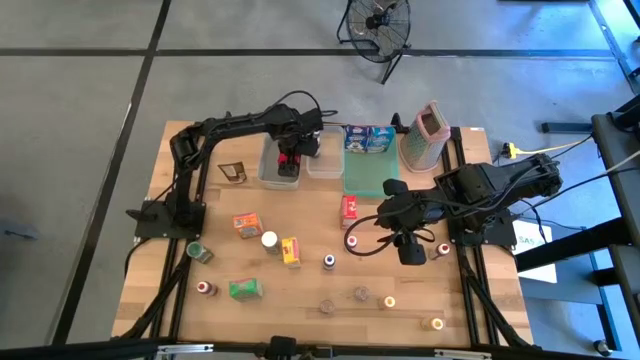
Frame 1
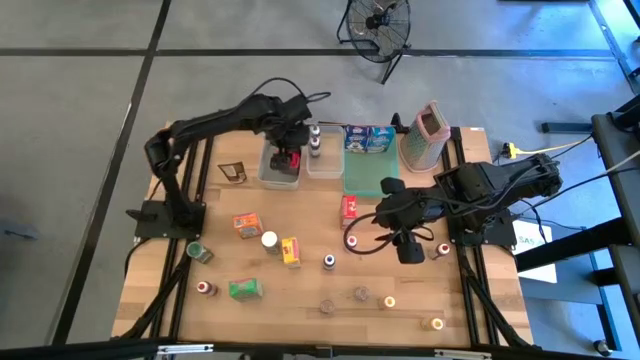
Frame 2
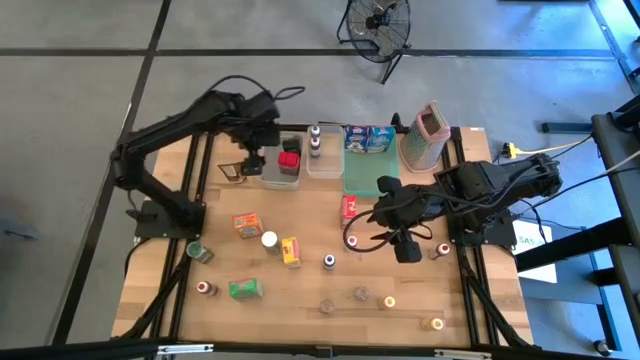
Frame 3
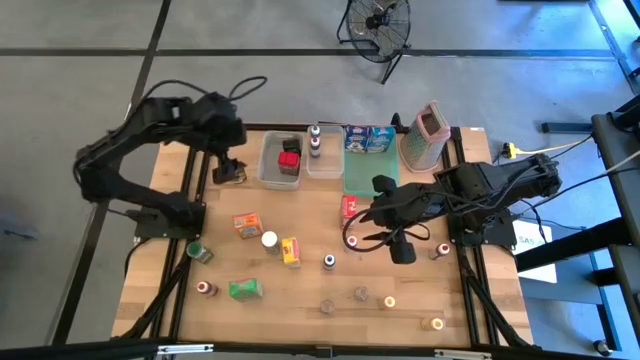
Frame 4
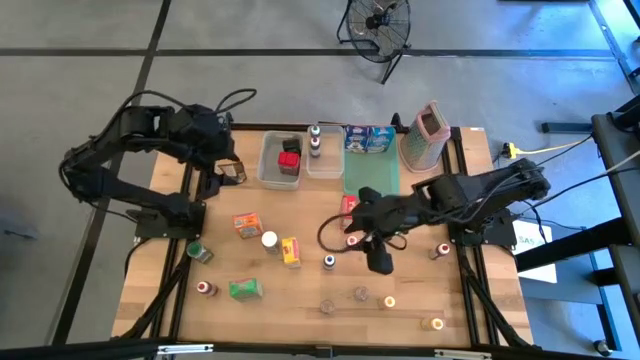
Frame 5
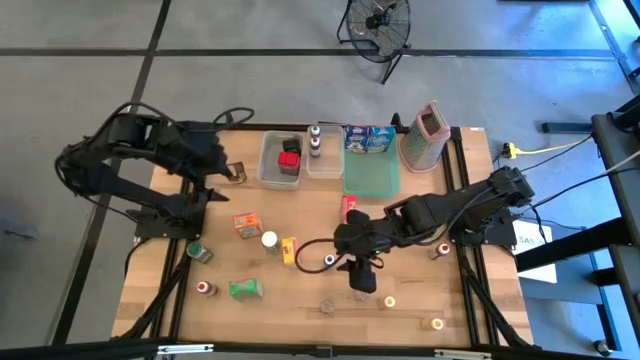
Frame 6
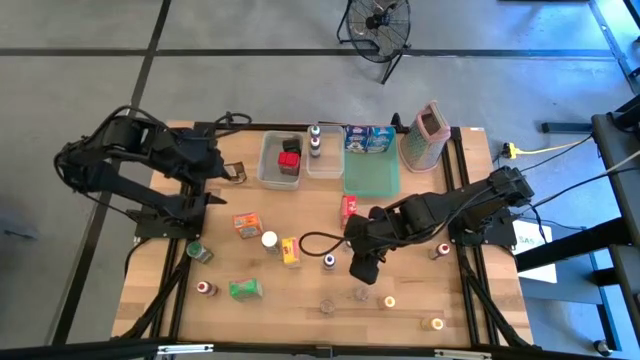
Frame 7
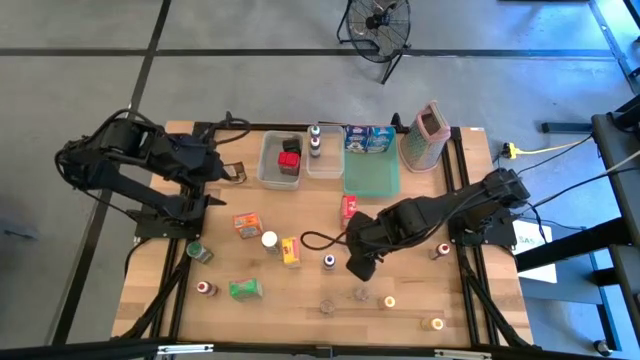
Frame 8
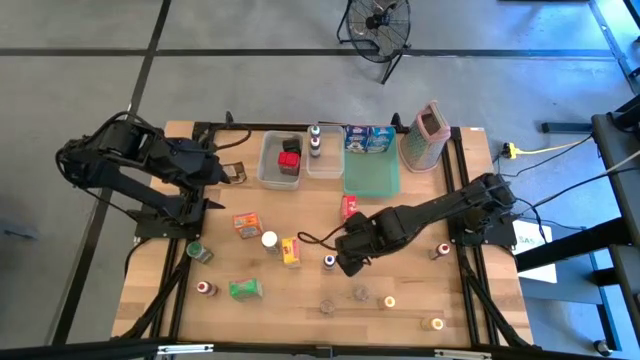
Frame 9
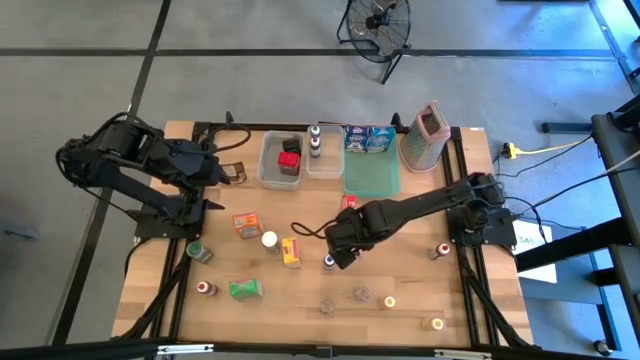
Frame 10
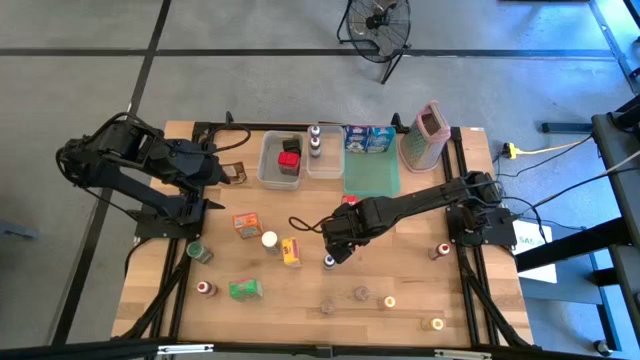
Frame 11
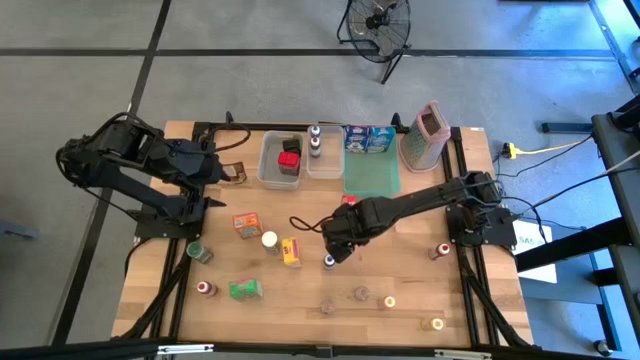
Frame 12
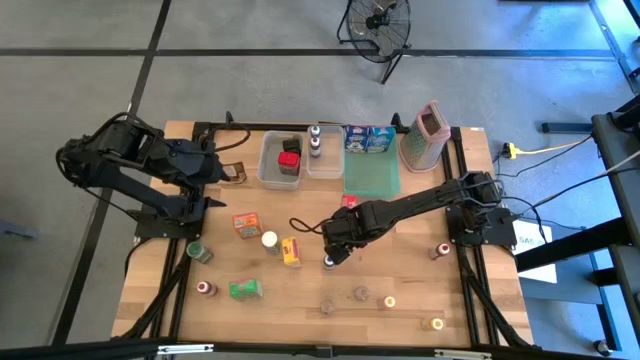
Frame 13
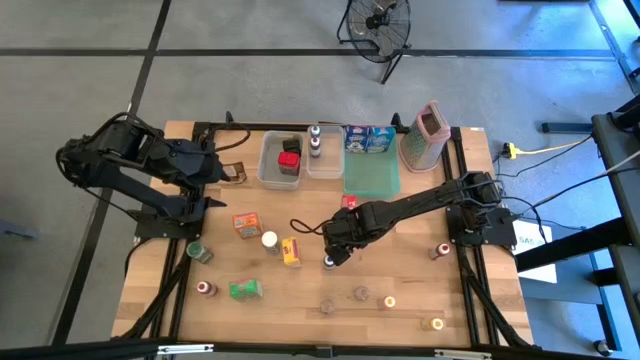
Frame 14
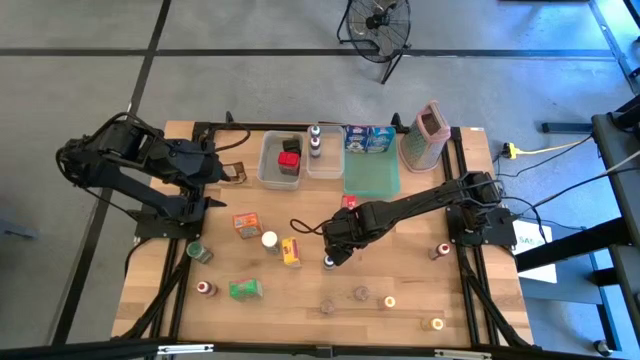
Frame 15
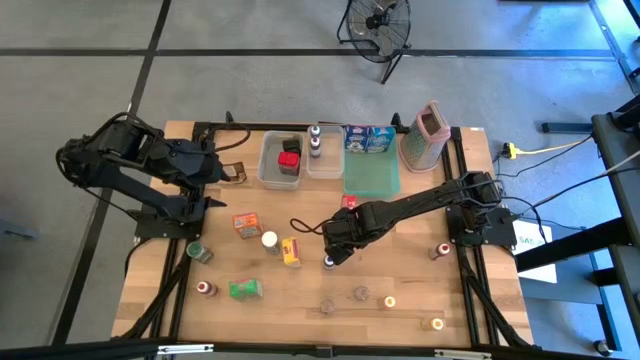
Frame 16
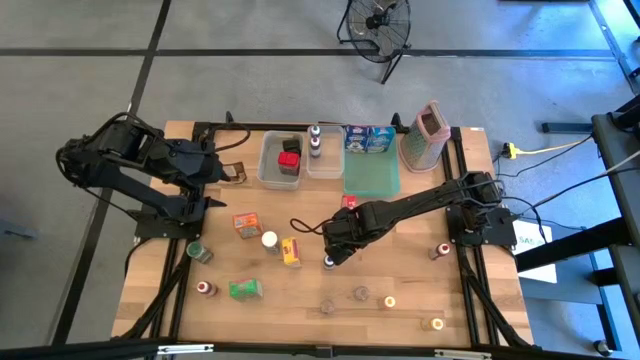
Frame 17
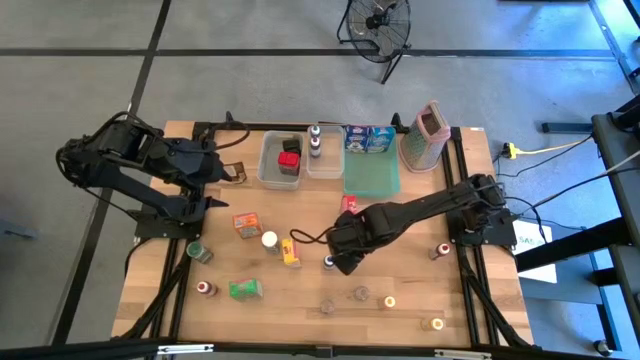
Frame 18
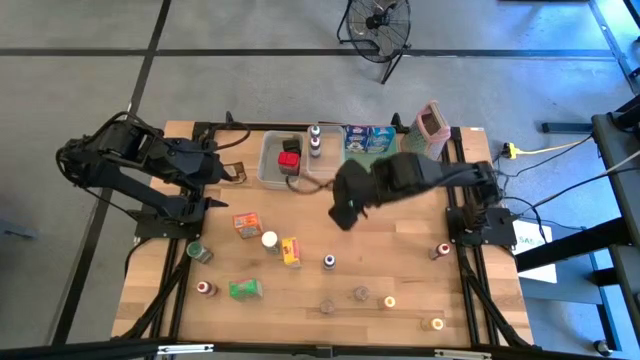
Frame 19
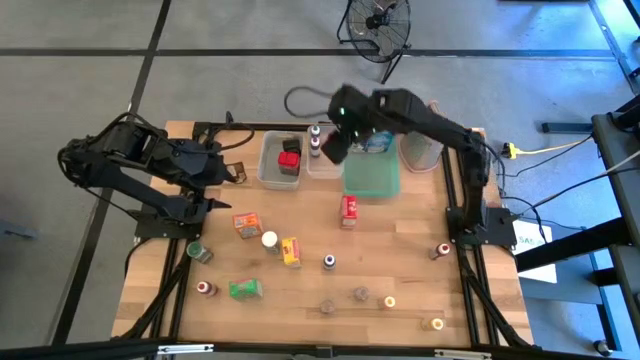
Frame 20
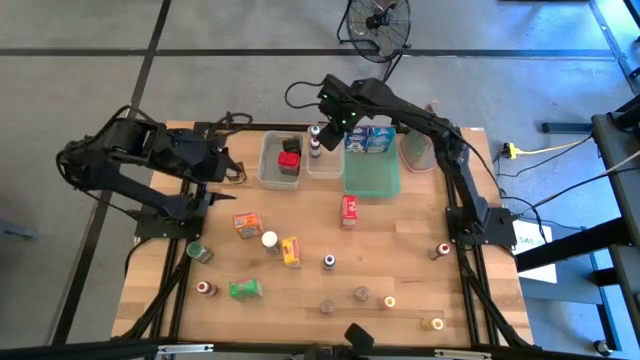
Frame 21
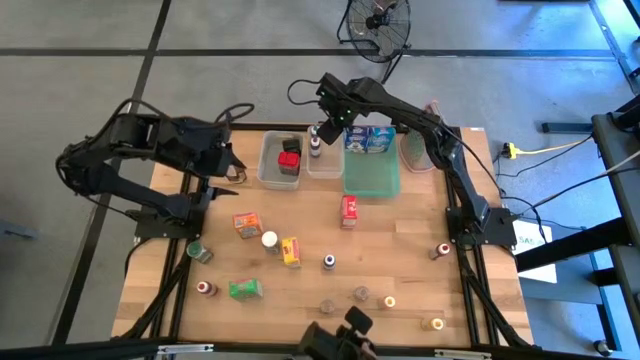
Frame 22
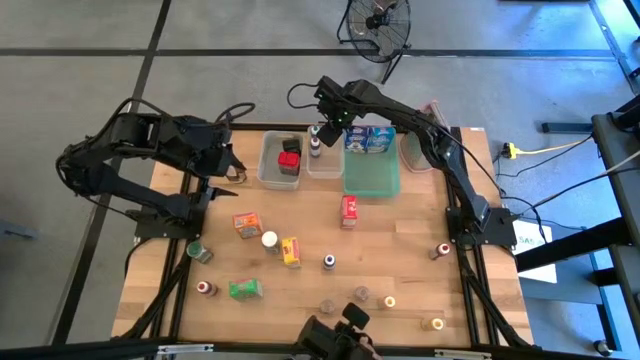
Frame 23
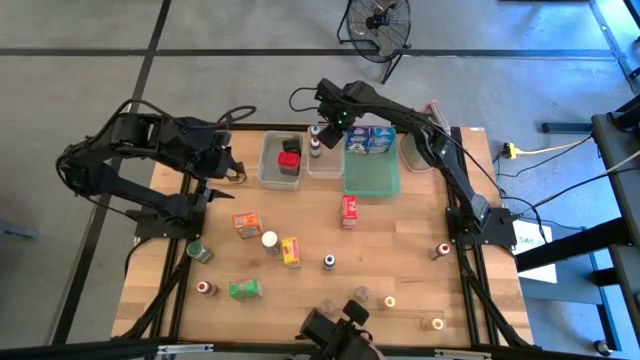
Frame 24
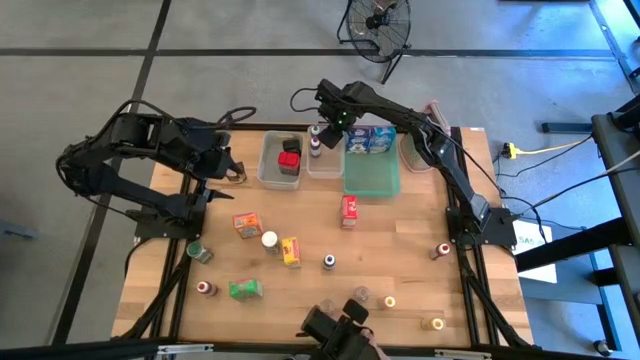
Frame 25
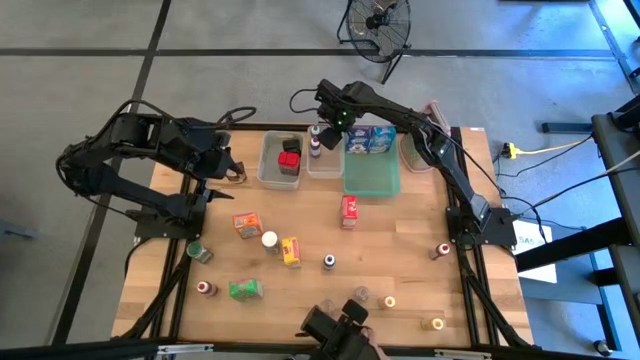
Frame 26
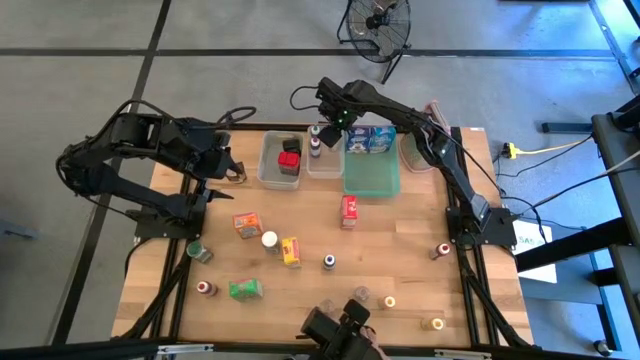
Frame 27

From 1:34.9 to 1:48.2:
Task: Pick & Place Kitchen Items
Put the pink food coloring bottle into the transparent bin

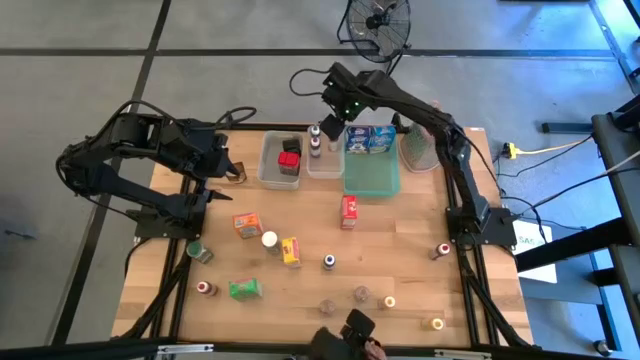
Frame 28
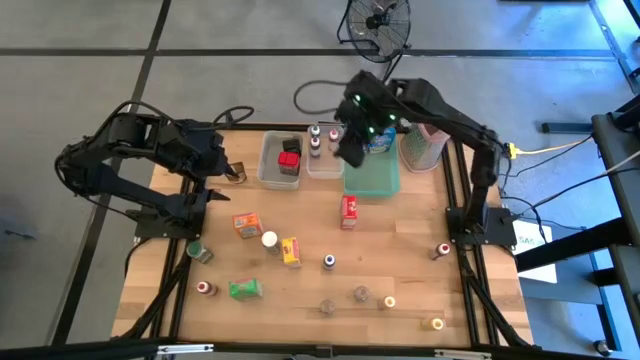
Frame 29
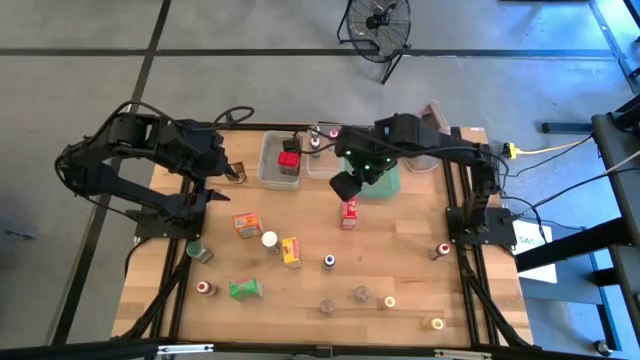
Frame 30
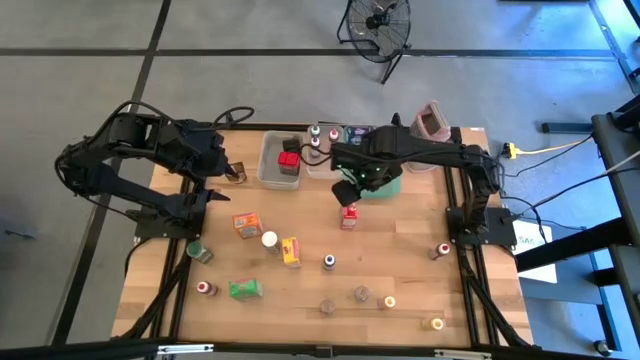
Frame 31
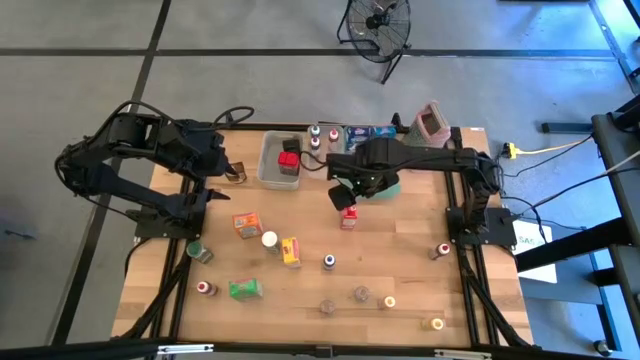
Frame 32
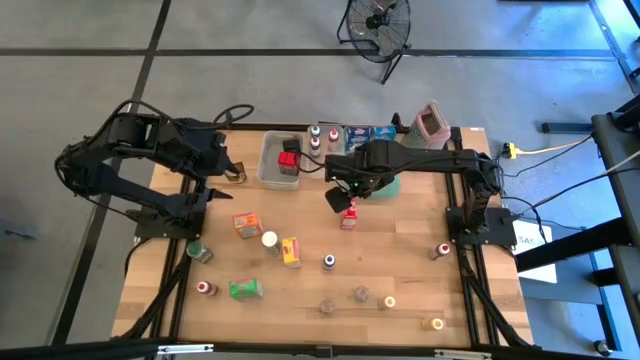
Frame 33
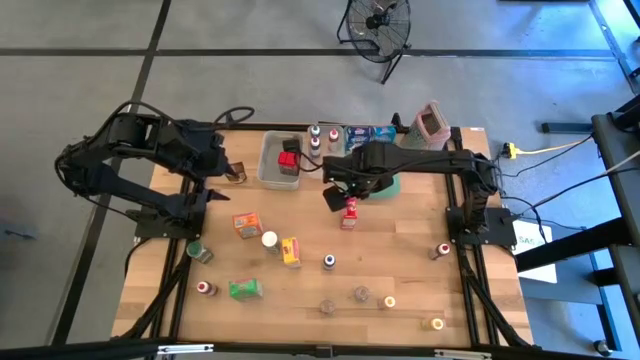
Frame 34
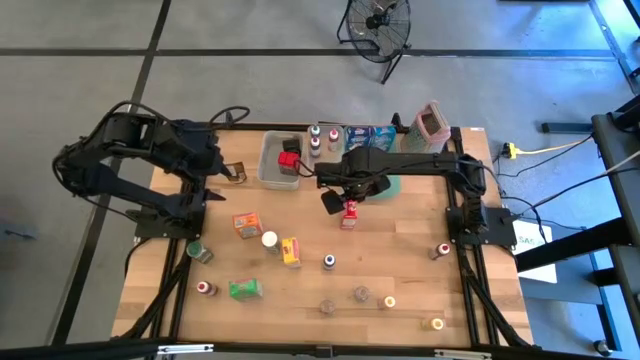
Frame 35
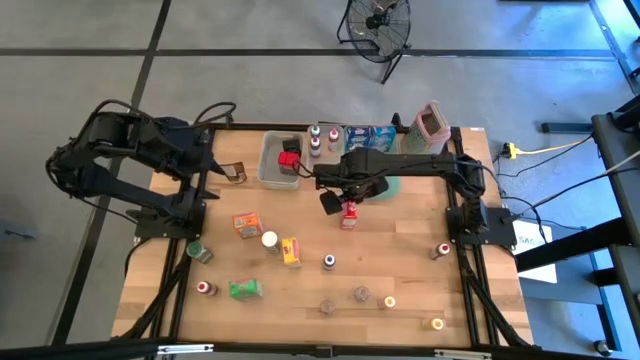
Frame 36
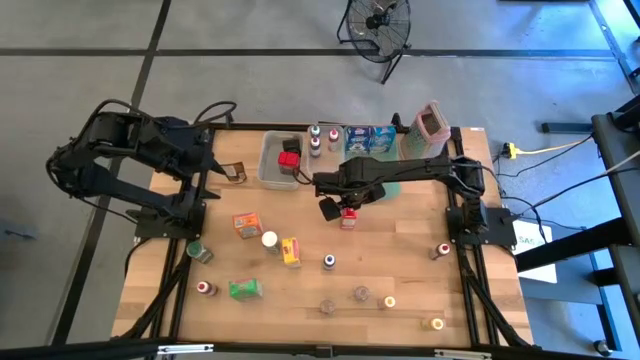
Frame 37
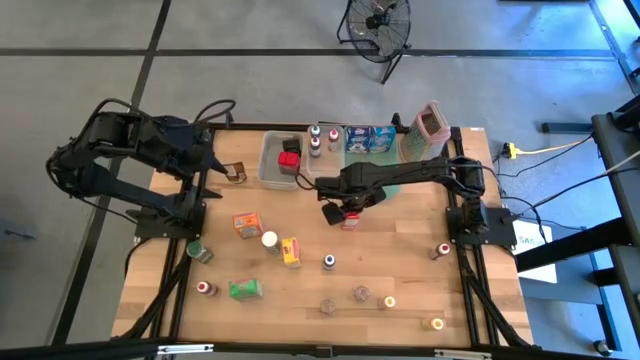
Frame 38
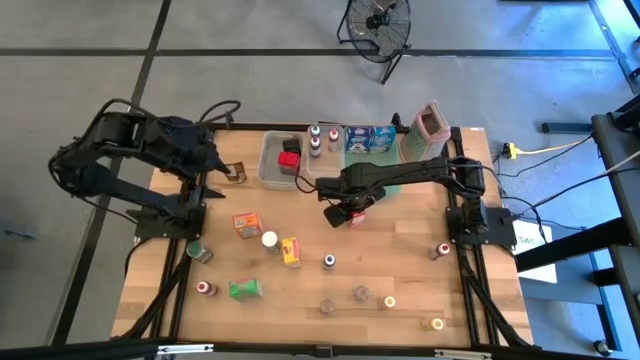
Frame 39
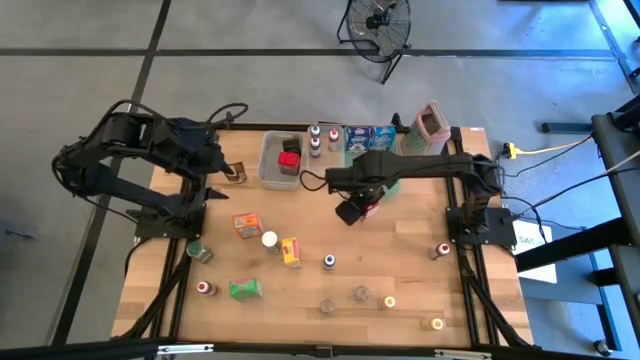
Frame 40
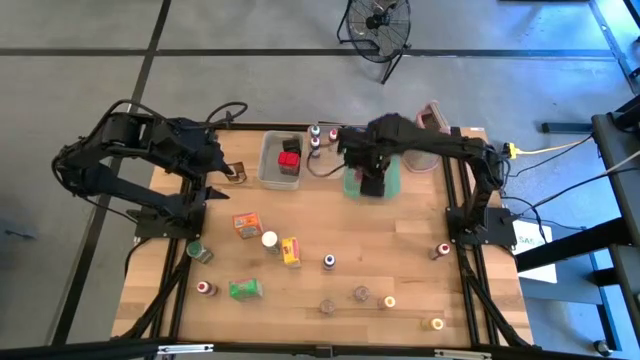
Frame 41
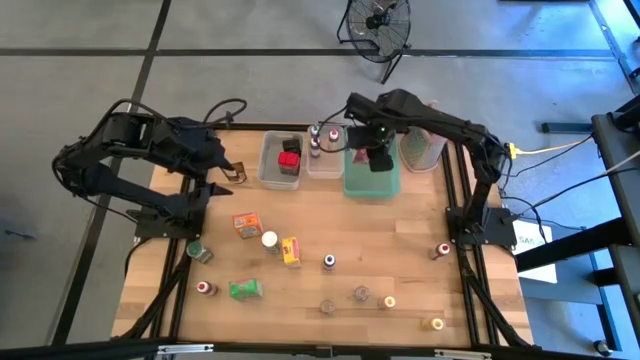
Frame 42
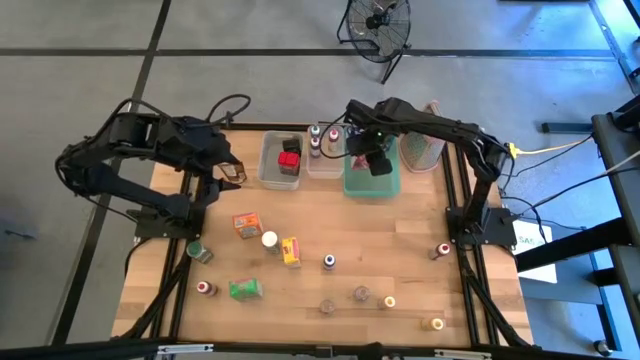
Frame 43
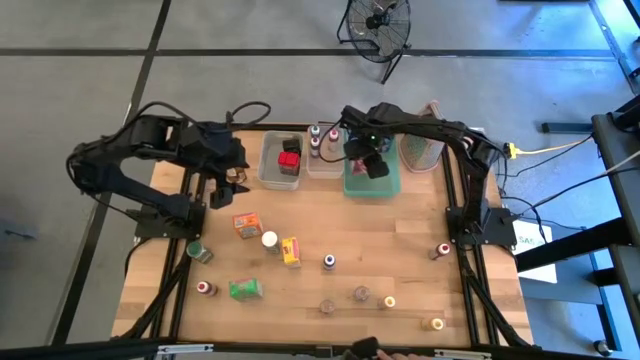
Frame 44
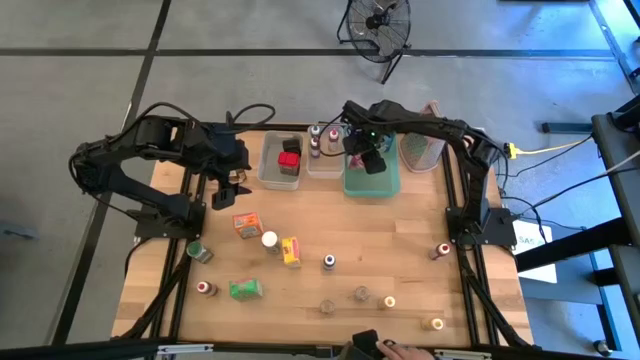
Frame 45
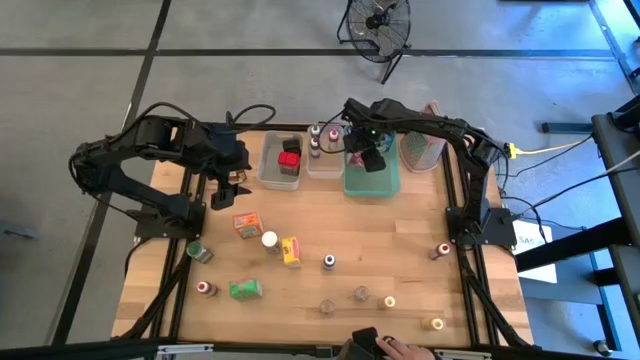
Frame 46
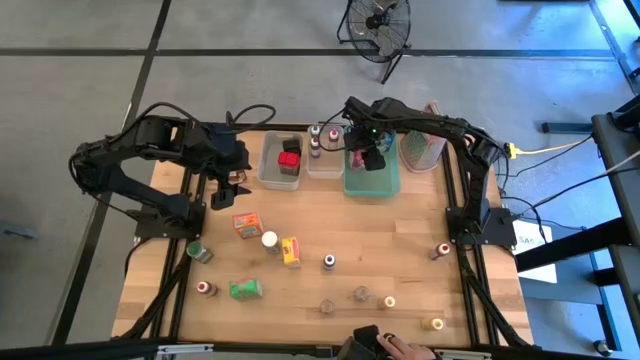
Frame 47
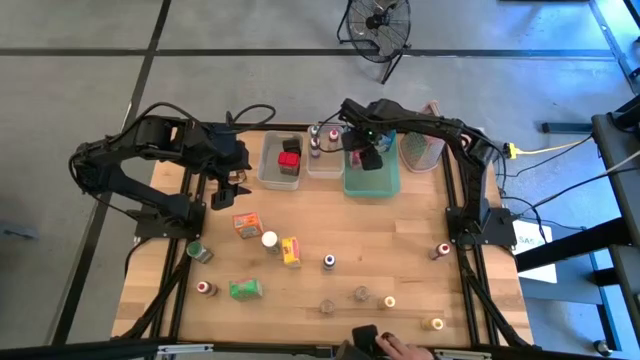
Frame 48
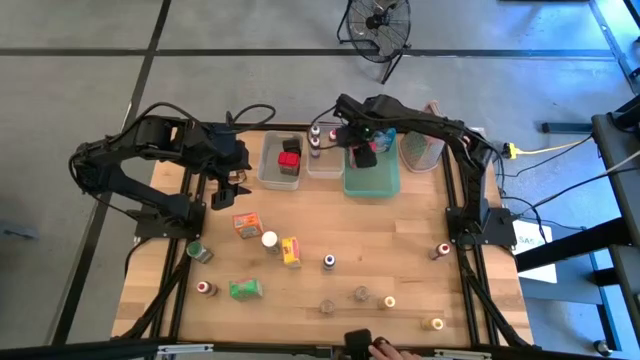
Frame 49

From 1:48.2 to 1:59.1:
Put the red cereal box into the green bin
